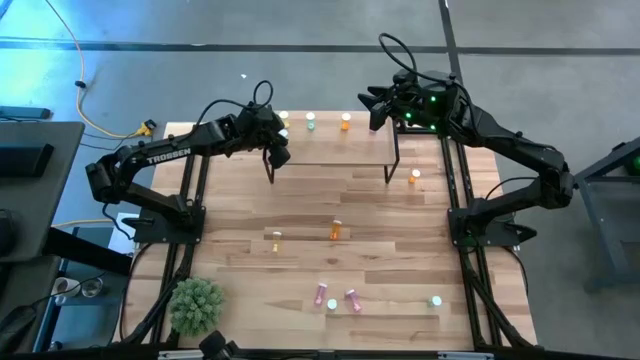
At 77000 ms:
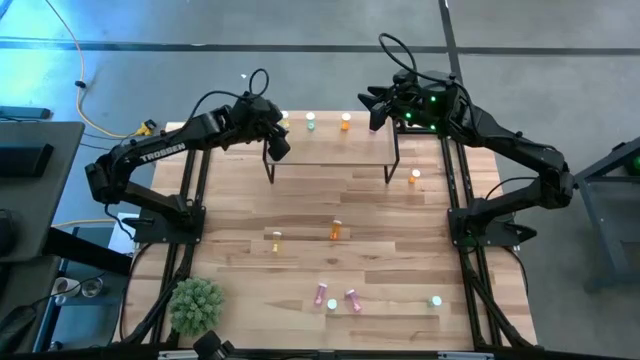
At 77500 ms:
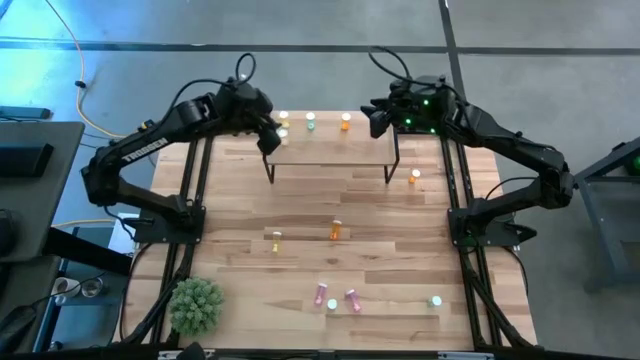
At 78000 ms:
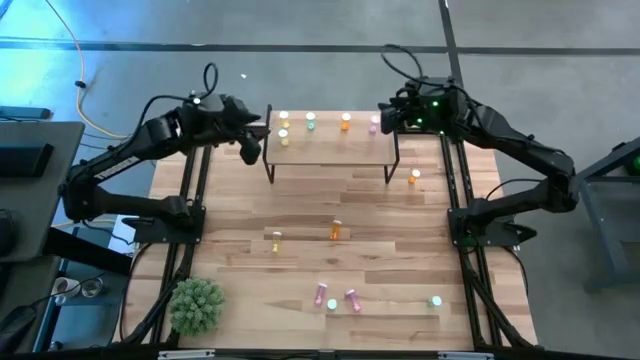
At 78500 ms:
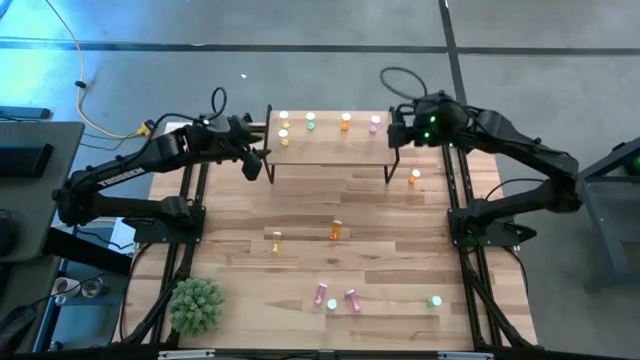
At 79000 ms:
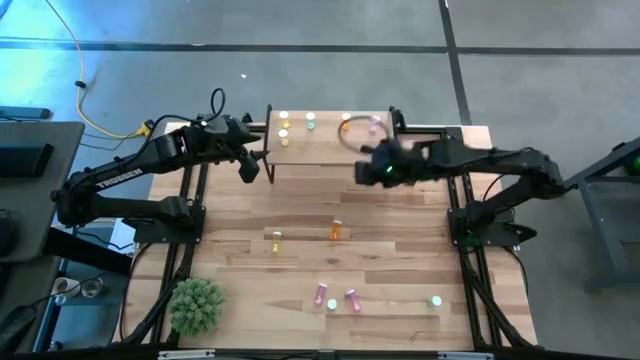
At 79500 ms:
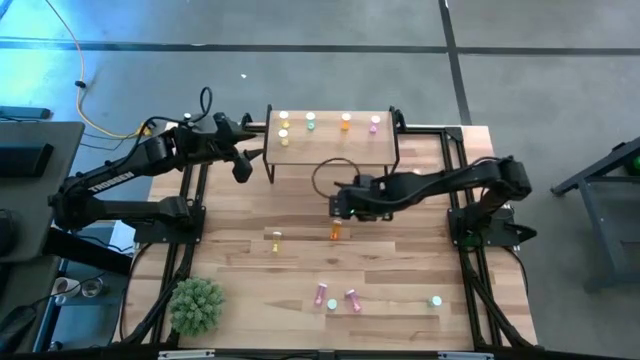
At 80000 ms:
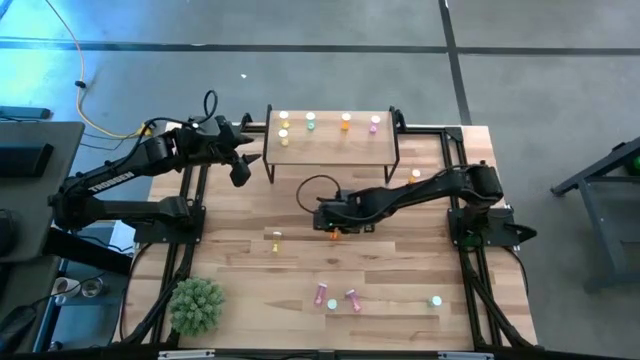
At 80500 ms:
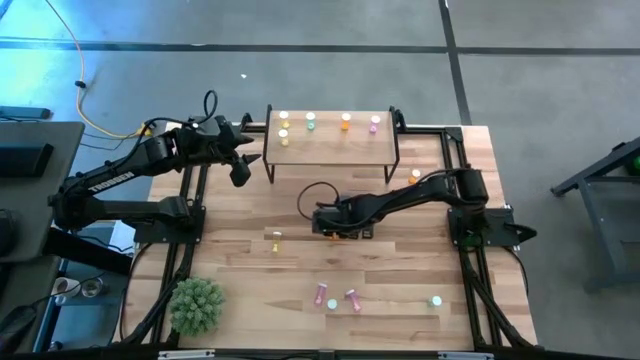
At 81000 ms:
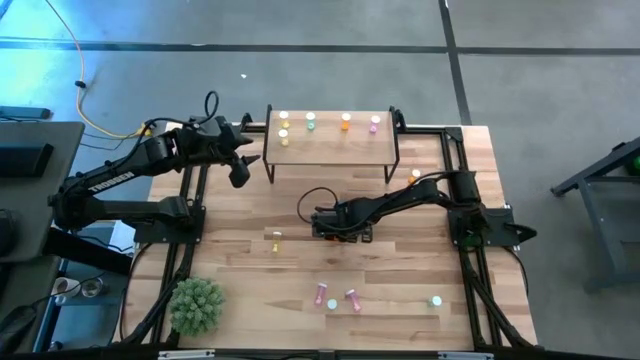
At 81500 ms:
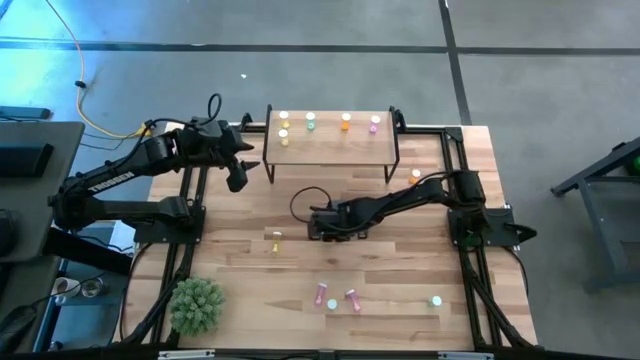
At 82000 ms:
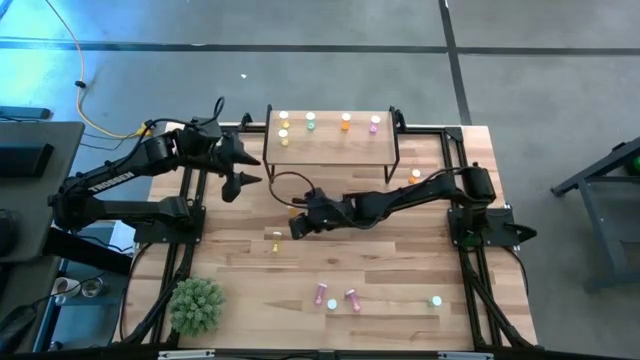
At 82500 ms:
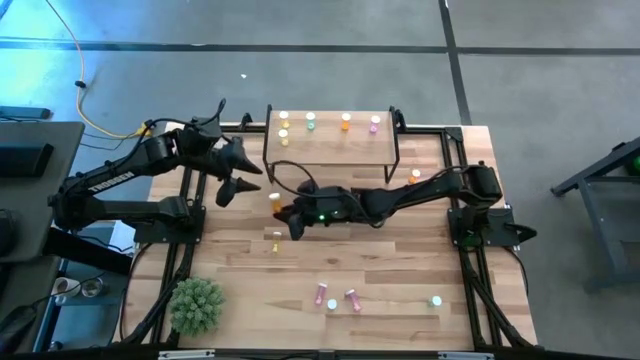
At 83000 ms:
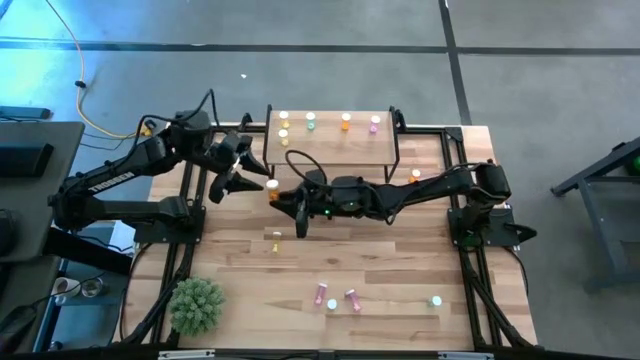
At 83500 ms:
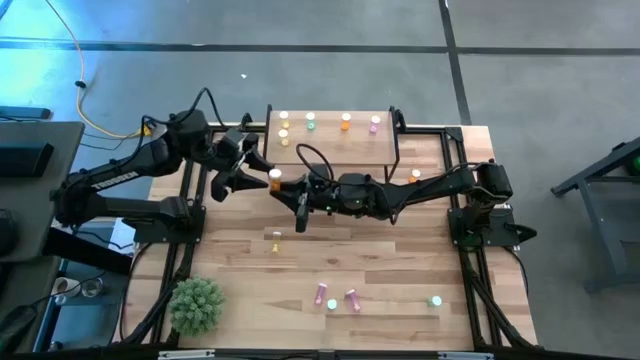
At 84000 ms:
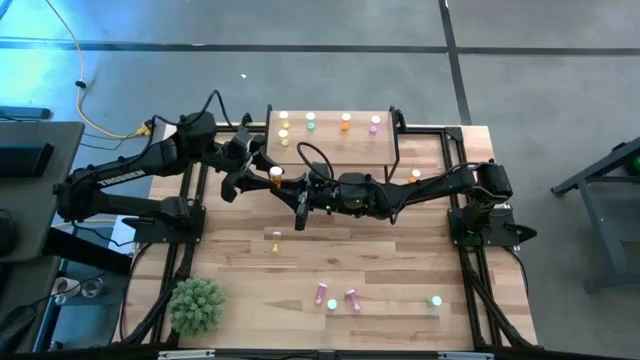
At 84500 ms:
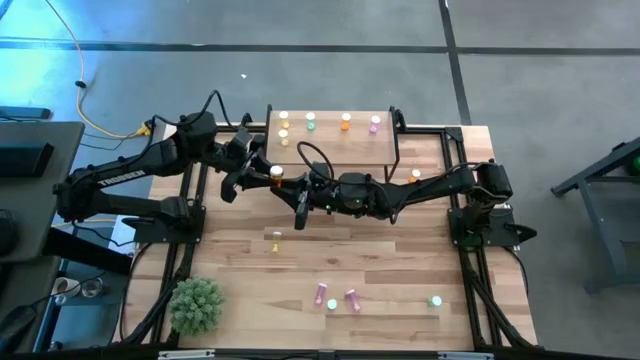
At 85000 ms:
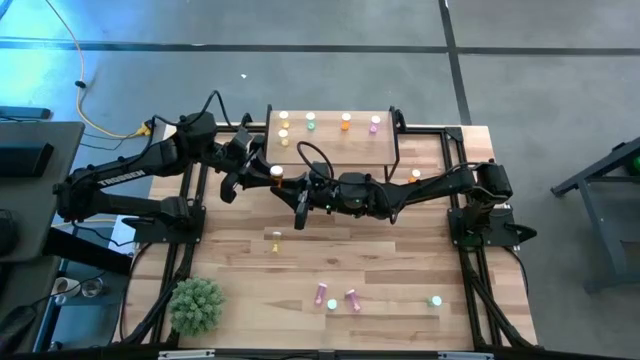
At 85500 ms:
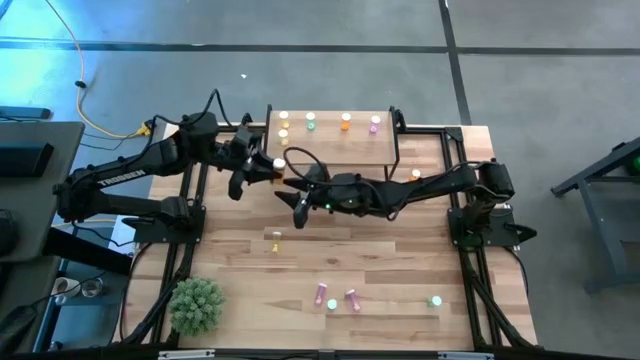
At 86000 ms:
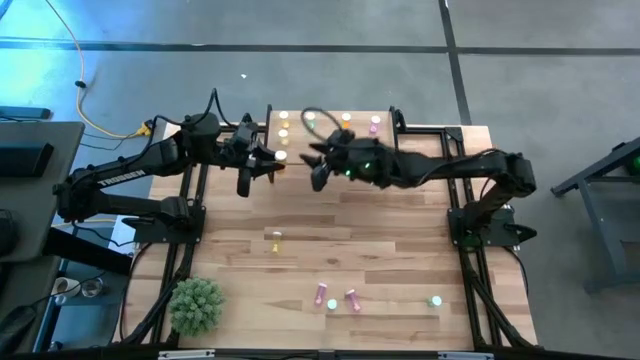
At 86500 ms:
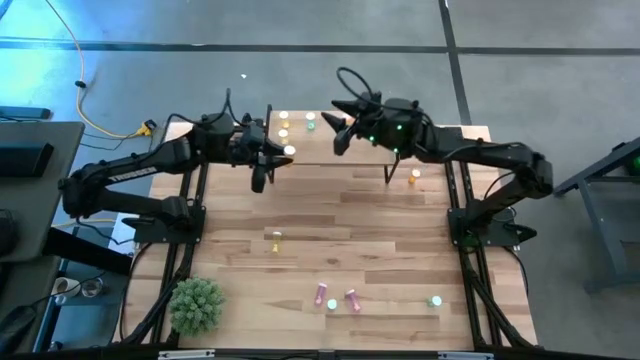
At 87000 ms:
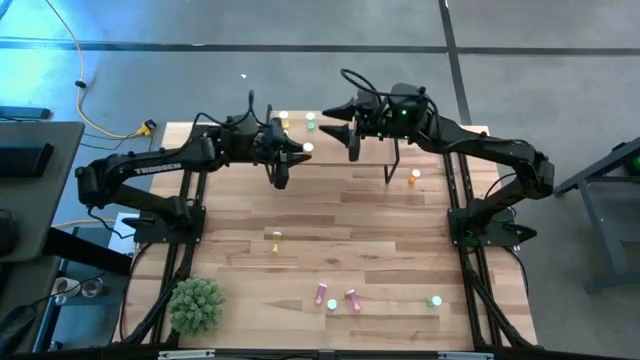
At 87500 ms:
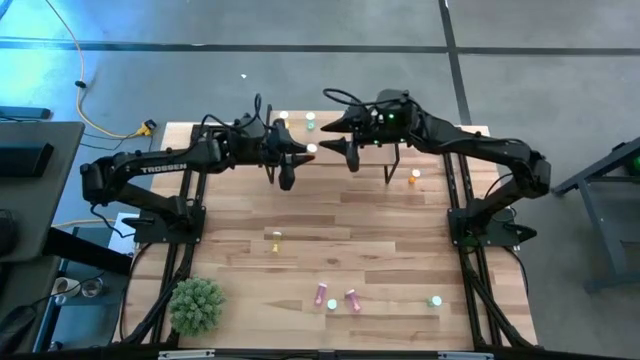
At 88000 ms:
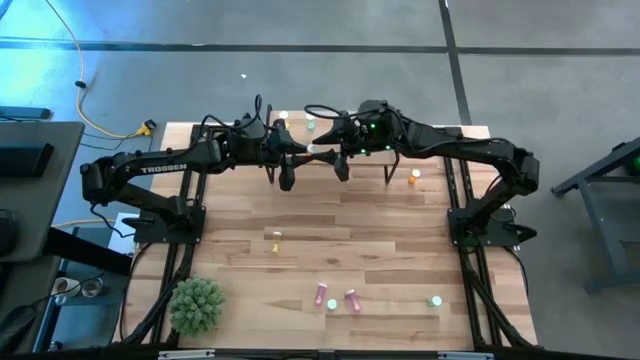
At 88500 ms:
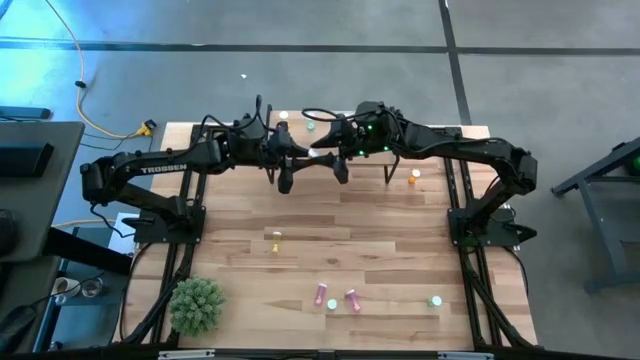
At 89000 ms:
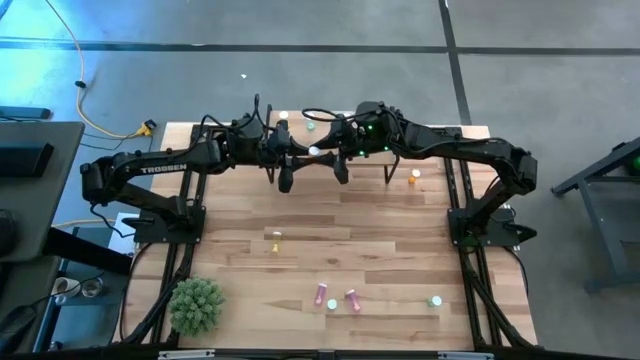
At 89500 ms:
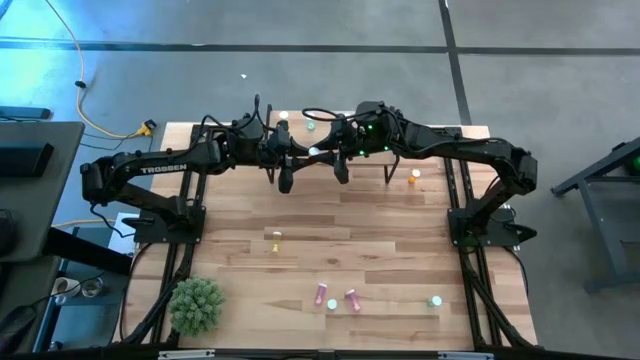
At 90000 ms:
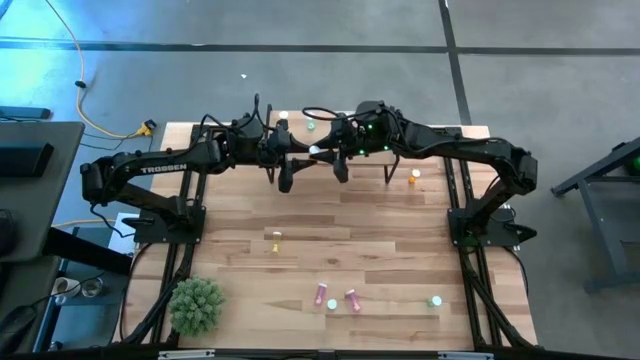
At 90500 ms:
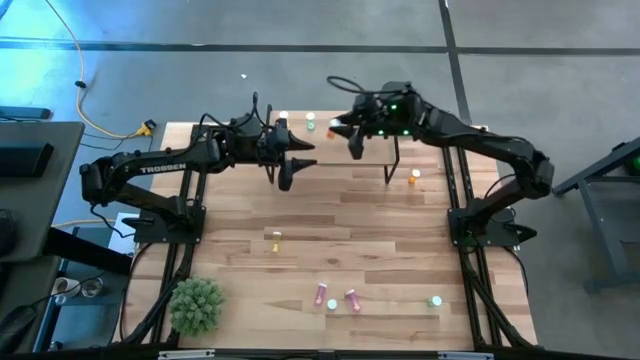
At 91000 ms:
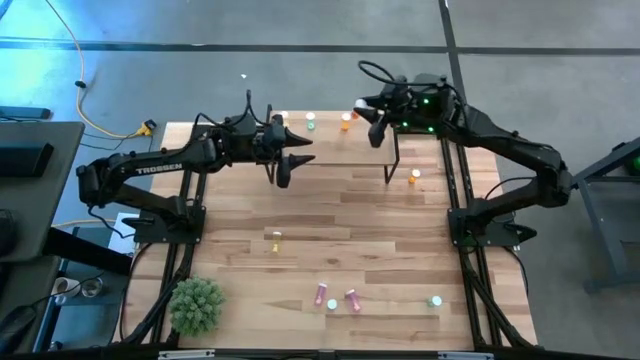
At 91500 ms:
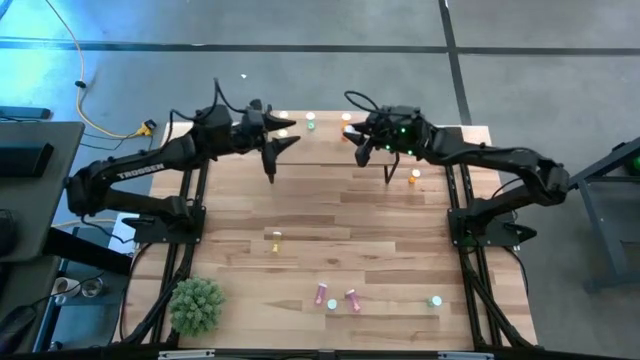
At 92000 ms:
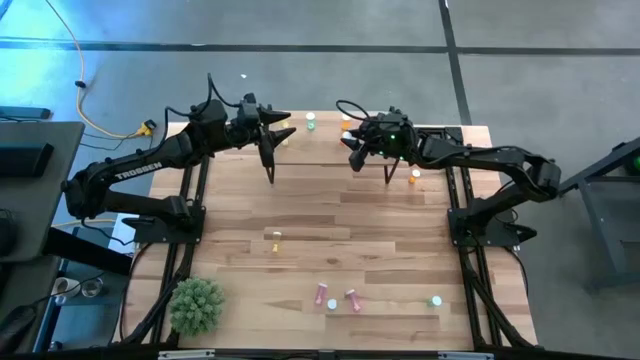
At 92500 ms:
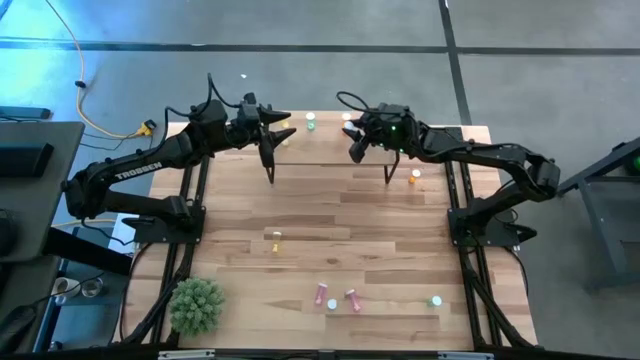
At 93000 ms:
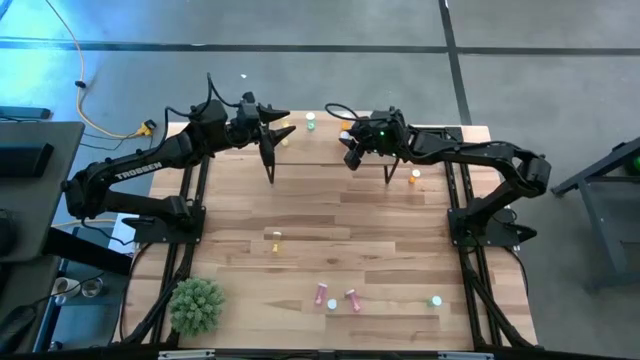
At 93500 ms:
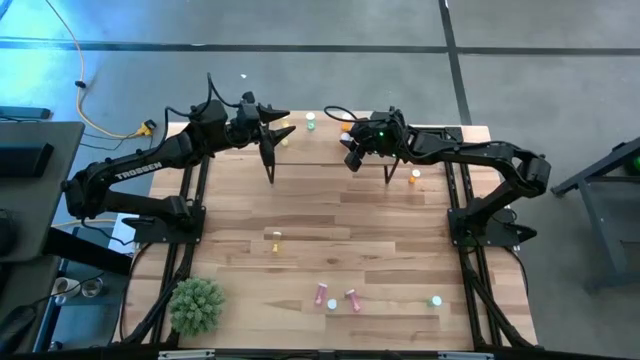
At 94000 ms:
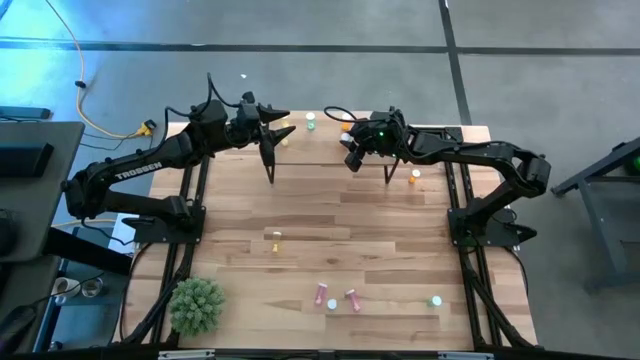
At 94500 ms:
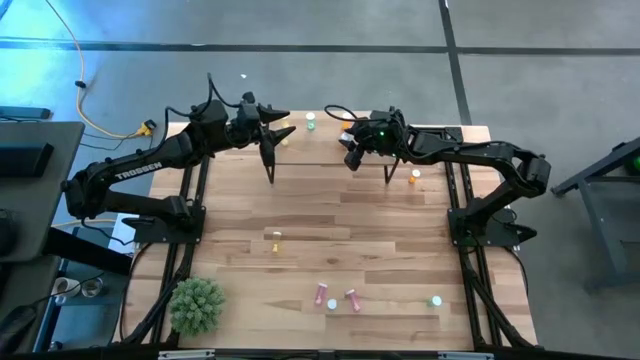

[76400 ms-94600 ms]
Task: Pick and place medicine bottles onto shelf by color
Put the bottom orange pill bottle on the shelf aligned with the other orange pill bottle

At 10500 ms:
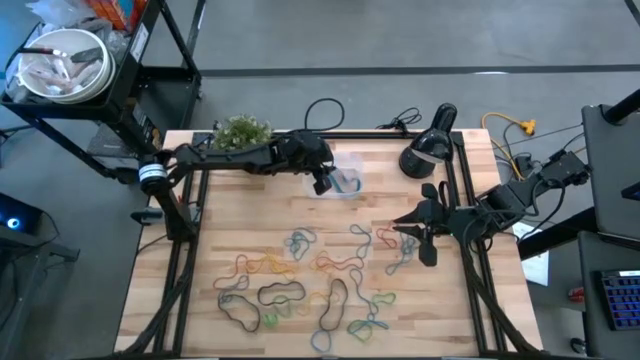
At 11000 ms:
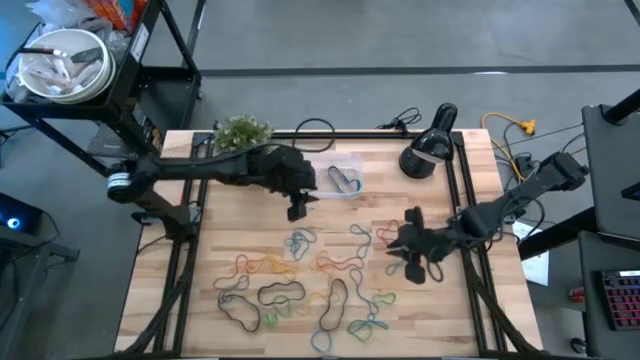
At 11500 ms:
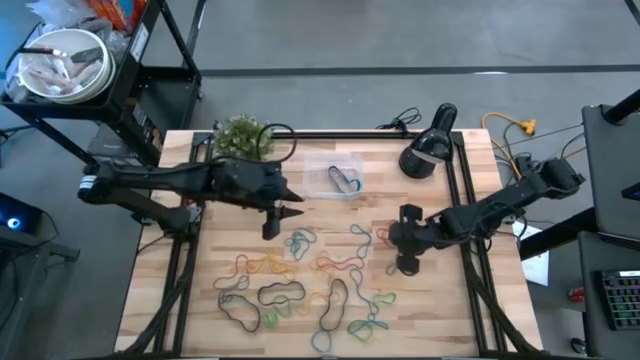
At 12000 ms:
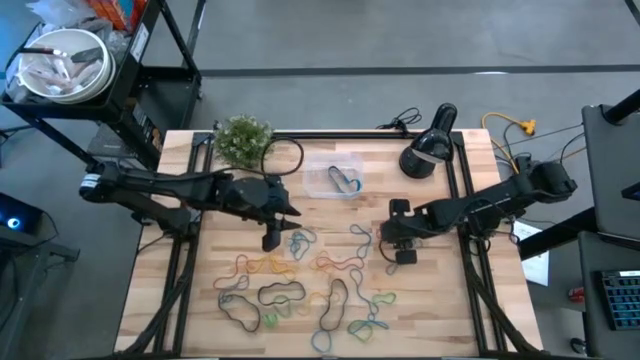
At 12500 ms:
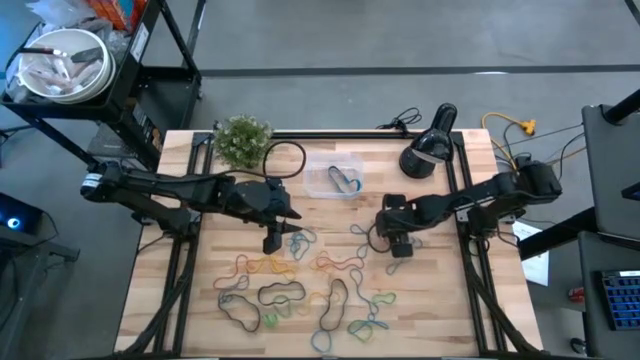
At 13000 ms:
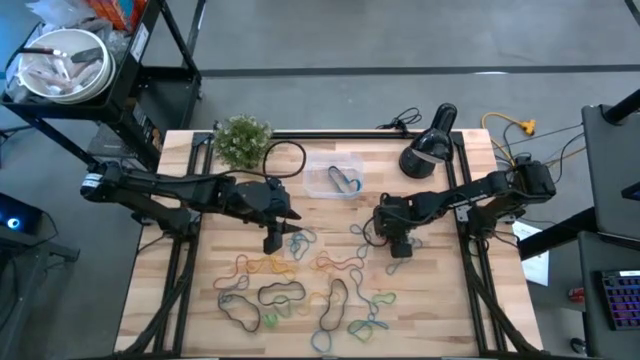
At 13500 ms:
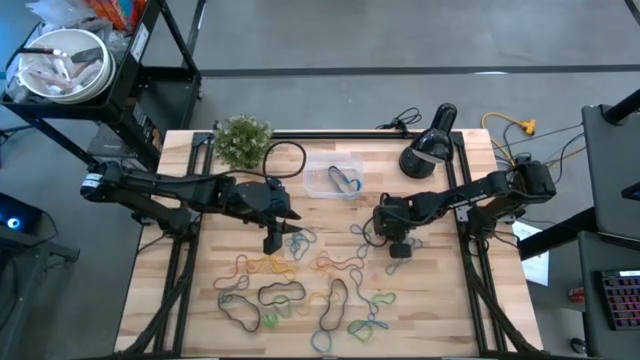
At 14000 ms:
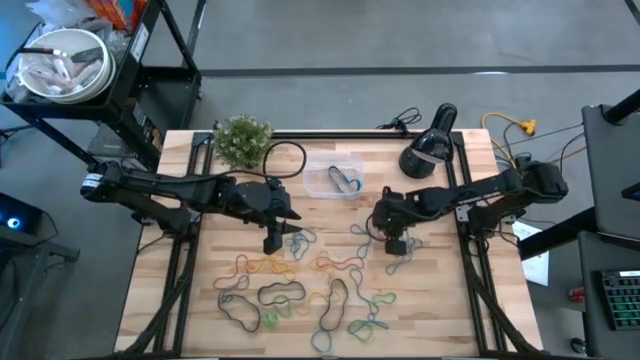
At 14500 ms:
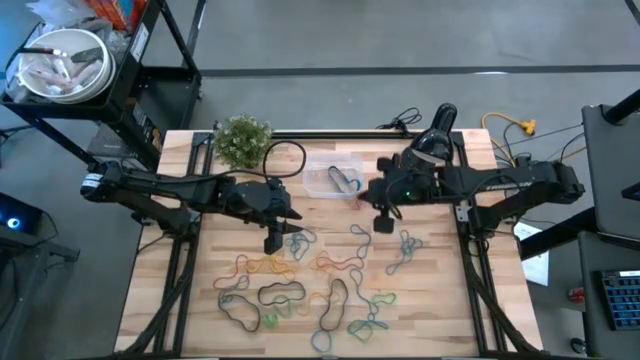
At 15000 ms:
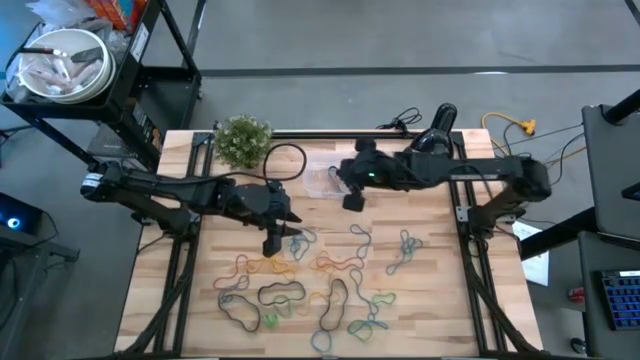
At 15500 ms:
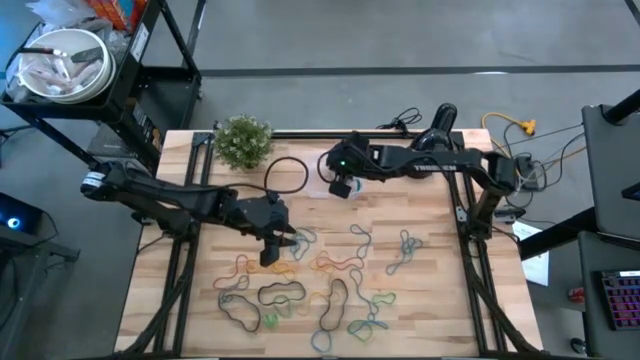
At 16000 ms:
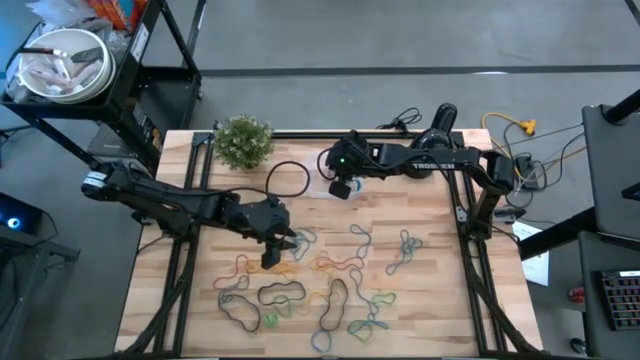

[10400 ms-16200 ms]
Task: Pick and place rubber bands into bin
Put the red rubberband into the transparent bin
